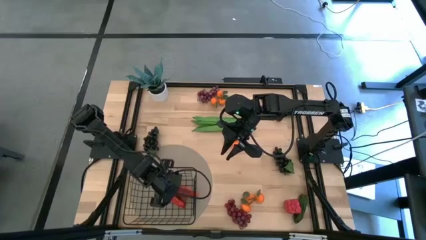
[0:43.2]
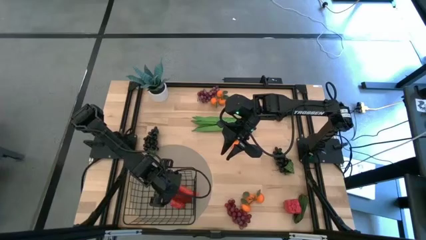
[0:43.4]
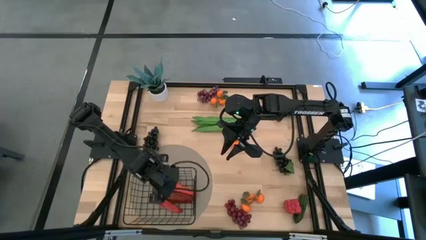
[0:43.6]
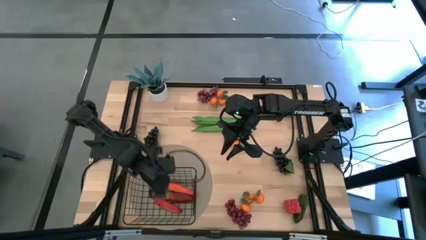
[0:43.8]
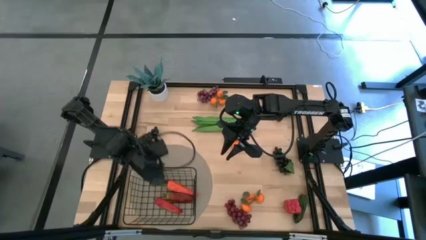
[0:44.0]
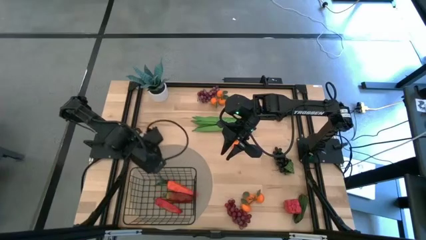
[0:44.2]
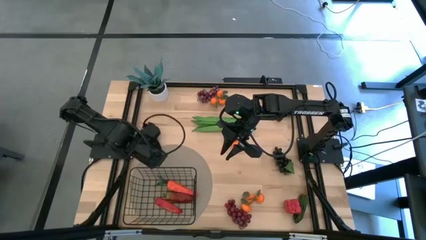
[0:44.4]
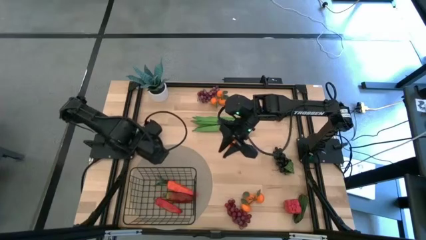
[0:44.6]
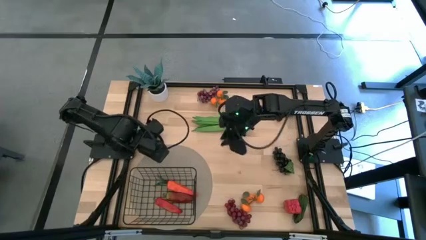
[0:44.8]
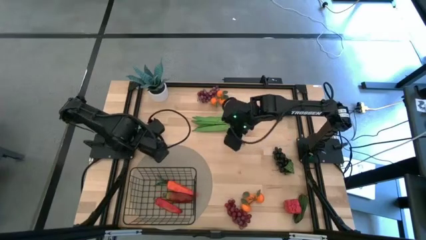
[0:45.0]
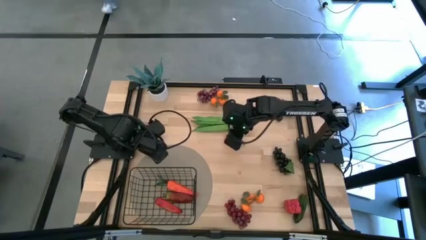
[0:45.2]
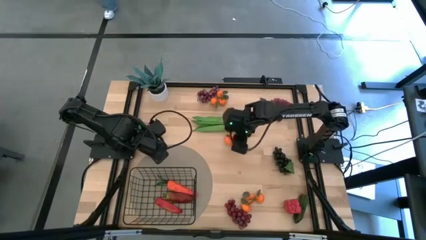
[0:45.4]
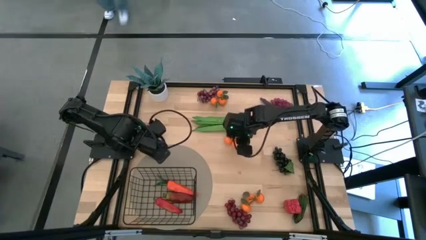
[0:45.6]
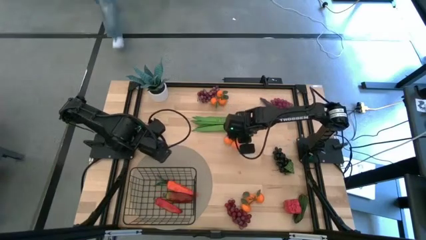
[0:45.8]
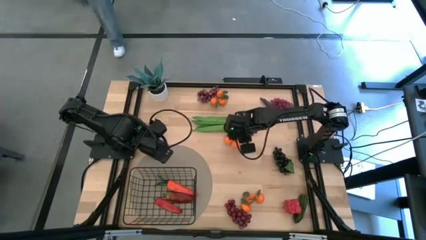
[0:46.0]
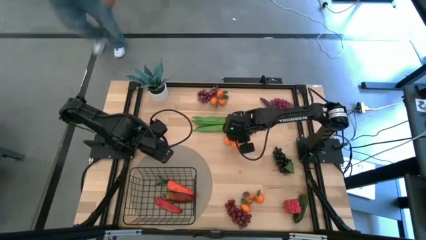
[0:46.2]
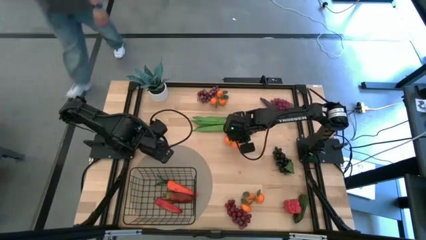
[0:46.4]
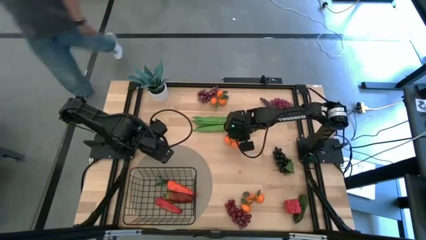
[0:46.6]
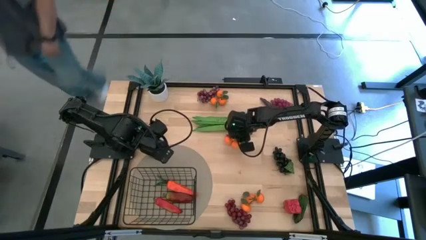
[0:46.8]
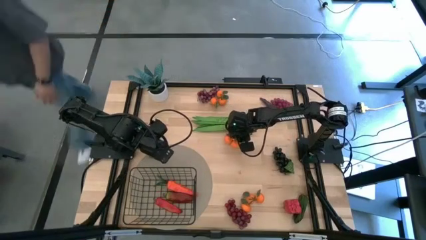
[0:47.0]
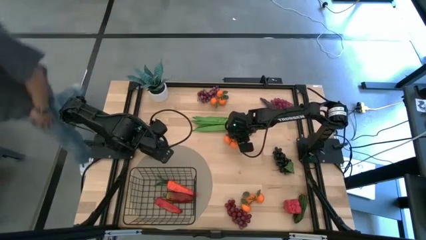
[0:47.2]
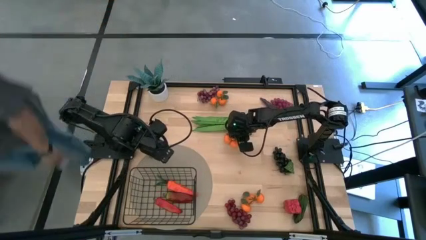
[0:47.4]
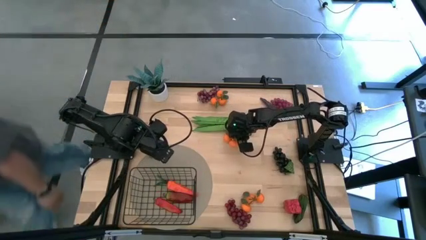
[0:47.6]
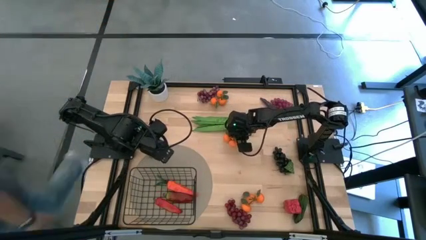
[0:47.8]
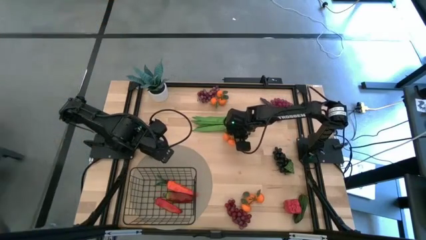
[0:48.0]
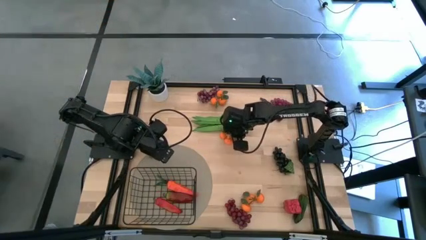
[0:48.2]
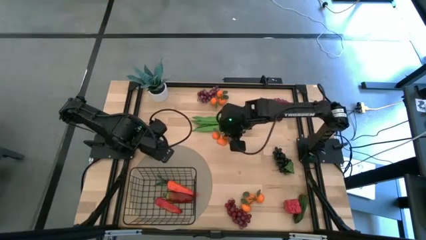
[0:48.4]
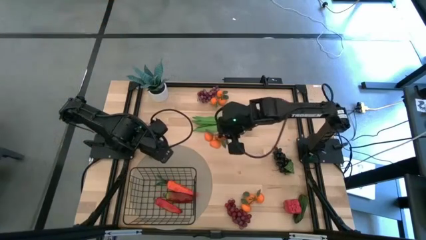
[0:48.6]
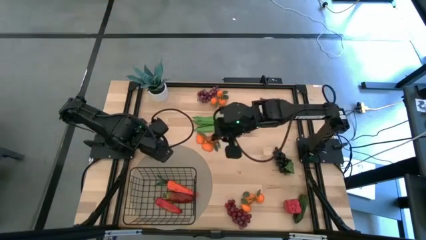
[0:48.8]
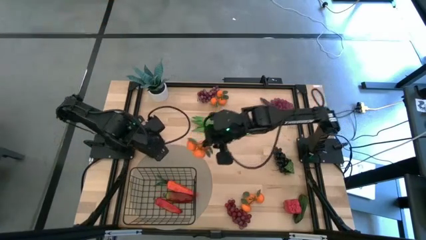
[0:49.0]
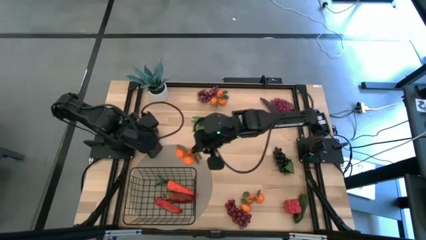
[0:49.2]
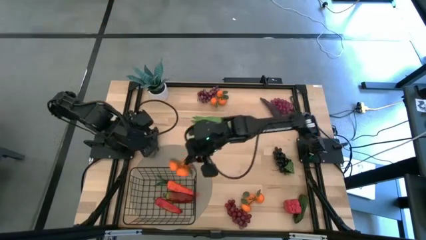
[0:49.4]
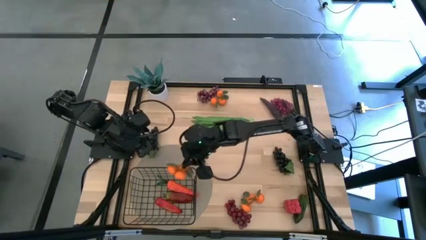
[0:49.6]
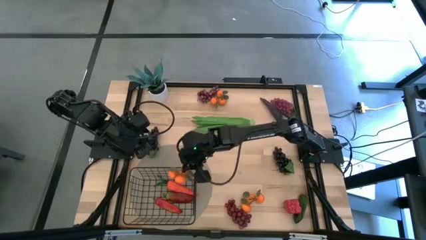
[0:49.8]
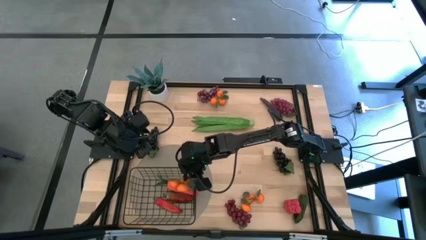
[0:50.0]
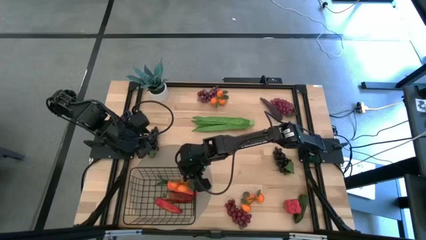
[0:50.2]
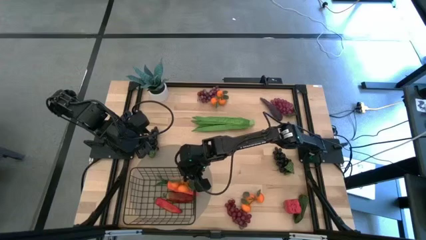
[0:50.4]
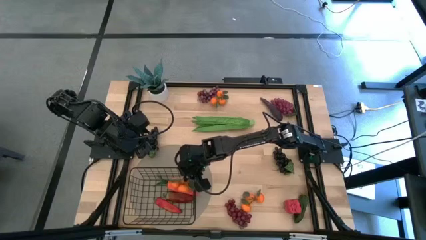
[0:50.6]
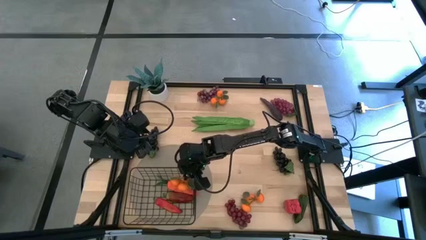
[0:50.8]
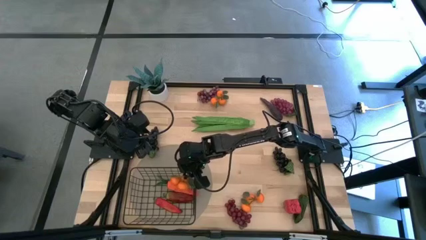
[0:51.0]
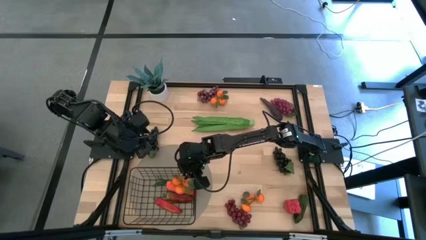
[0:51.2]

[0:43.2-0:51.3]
Task: Build produce basket
Put the middle bunch of tangerines into the wire basket

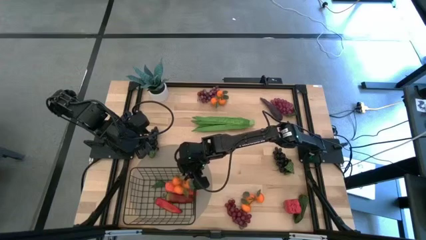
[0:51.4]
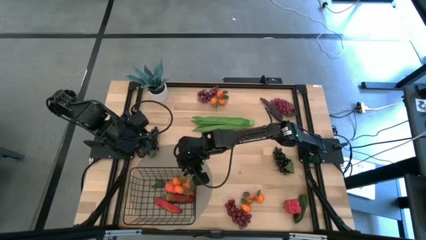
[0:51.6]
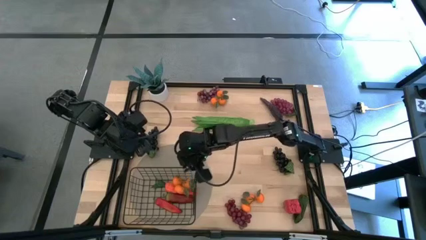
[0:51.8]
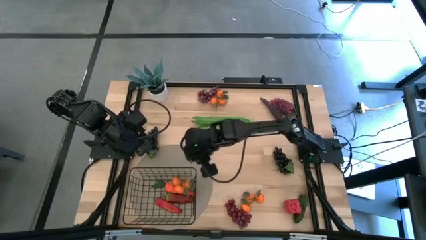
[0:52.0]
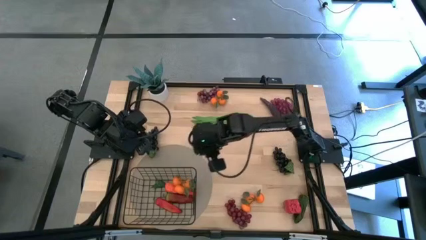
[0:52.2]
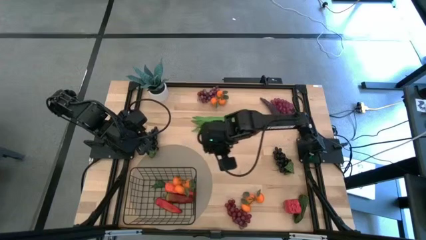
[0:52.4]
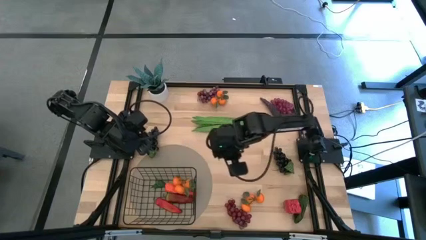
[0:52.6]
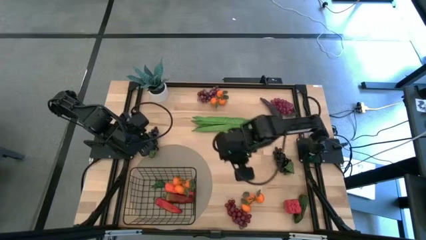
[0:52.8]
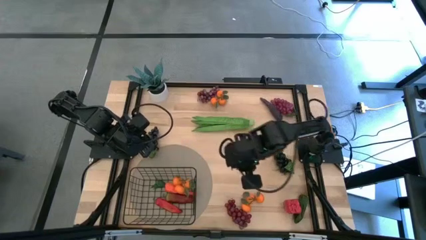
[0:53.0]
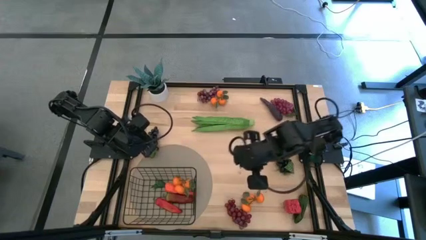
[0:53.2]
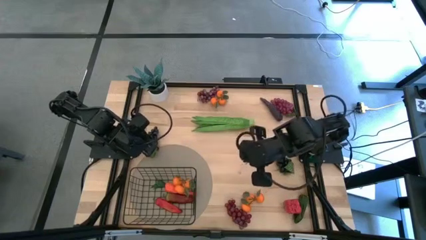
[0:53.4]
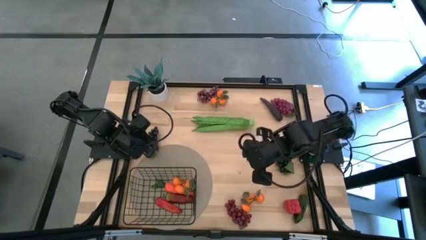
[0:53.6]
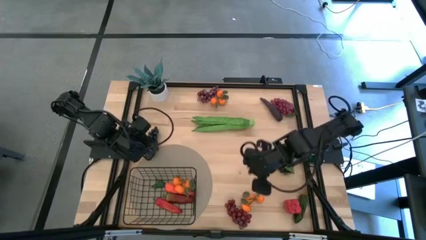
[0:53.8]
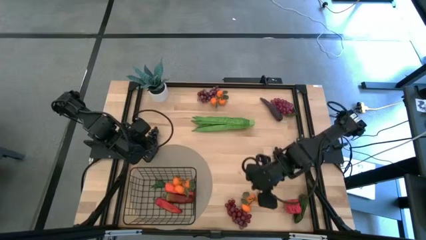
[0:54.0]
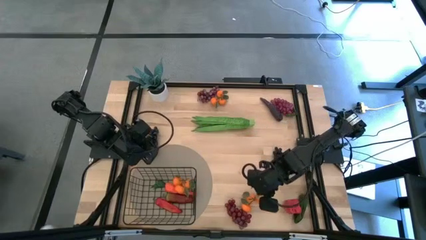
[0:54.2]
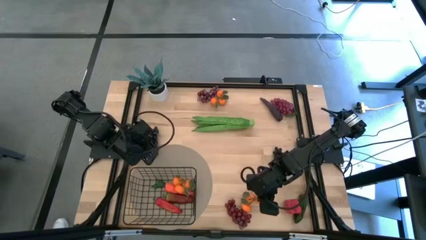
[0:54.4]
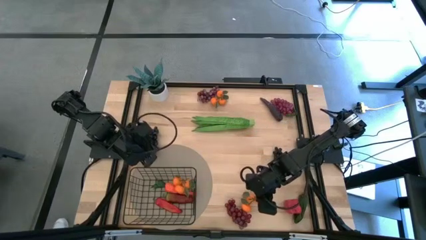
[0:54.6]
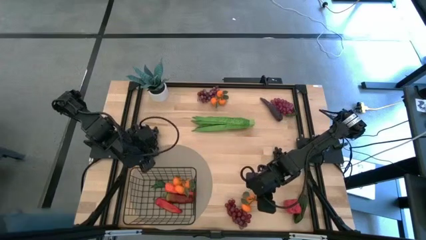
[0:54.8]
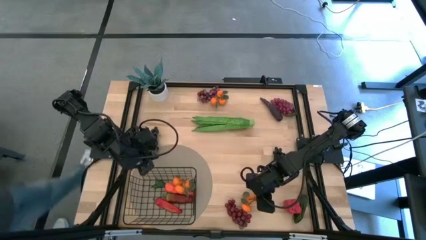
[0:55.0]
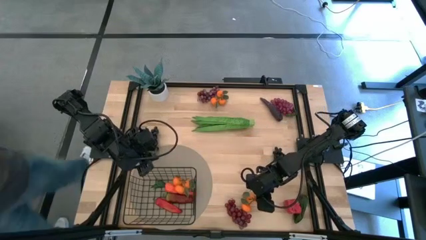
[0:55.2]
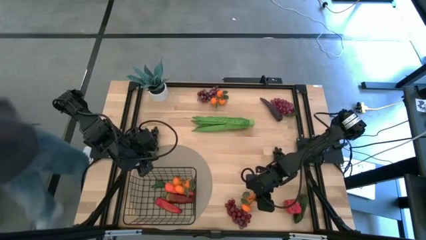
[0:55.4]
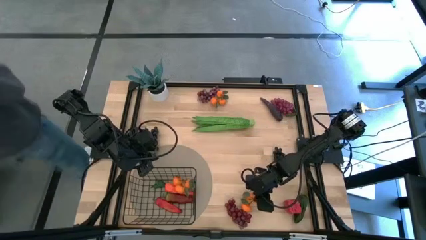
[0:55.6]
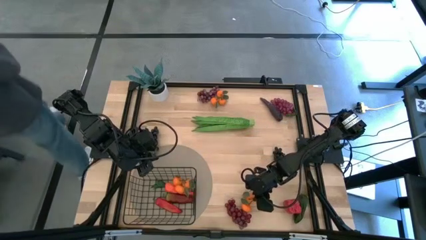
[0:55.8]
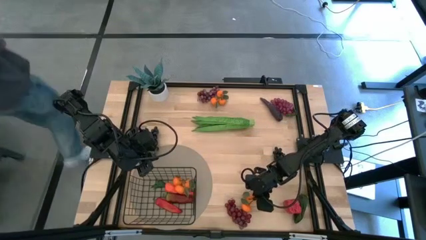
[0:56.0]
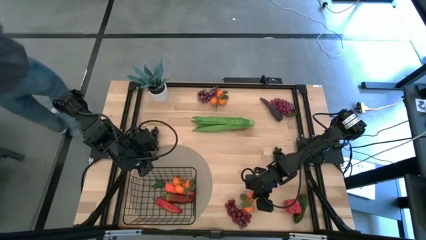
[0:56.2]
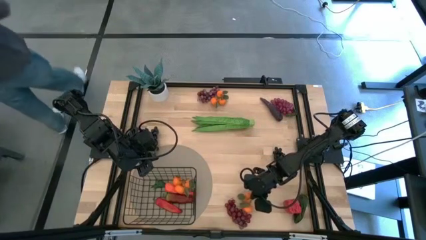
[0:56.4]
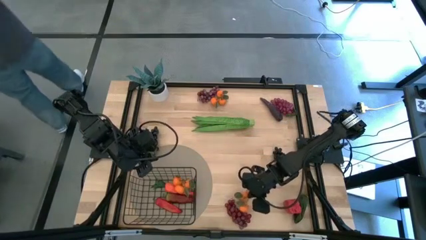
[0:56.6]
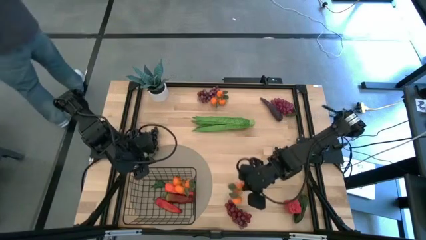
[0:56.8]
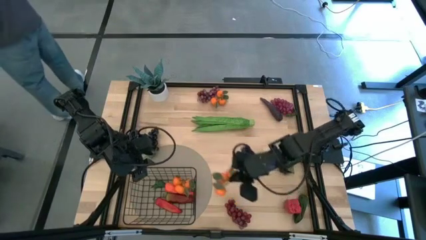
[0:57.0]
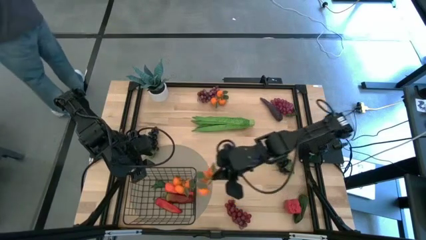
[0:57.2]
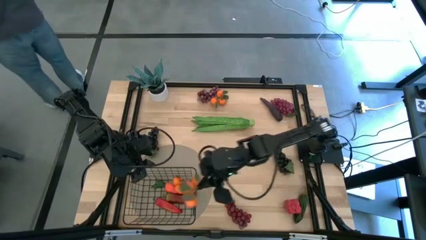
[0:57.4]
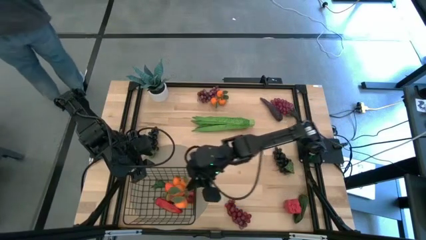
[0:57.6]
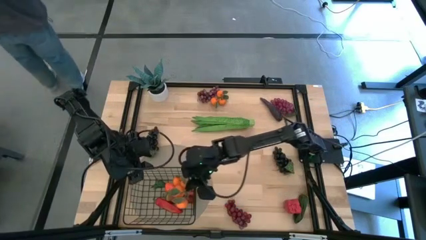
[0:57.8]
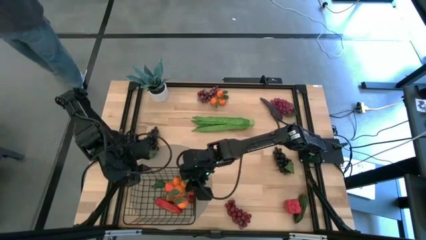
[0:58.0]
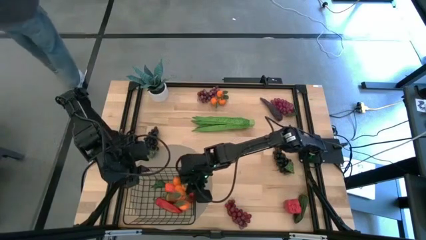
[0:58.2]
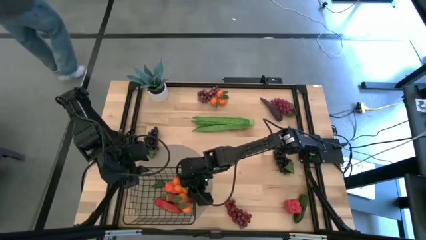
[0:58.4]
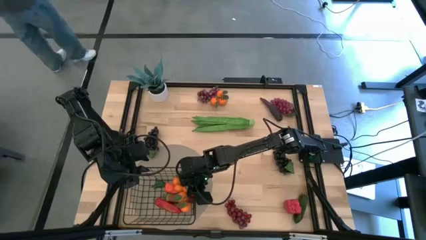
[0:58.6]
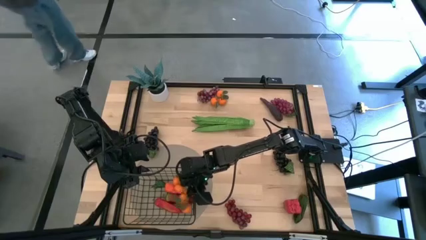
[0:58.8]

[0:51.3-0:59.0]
Put the bottom bunch of tangerines into the wire basket
